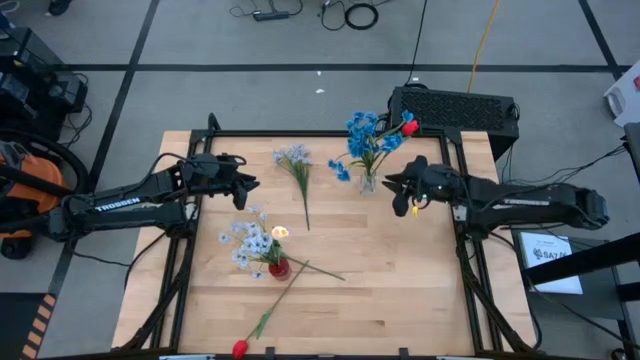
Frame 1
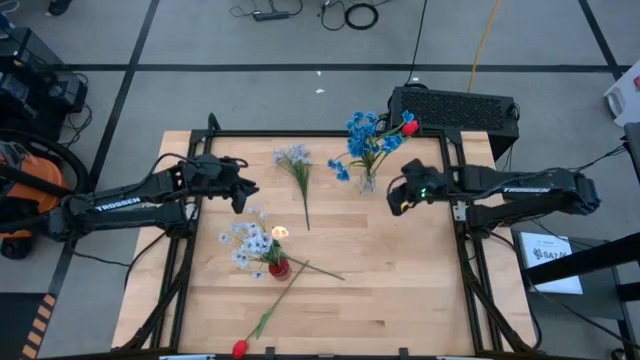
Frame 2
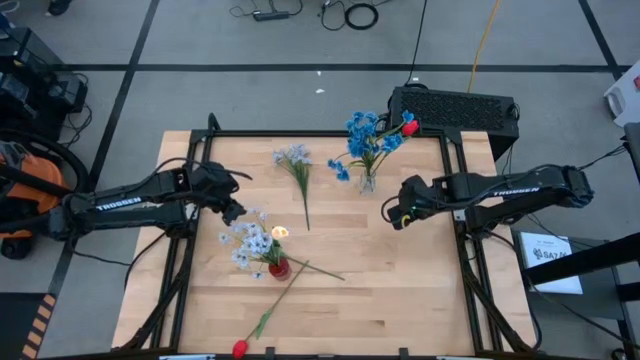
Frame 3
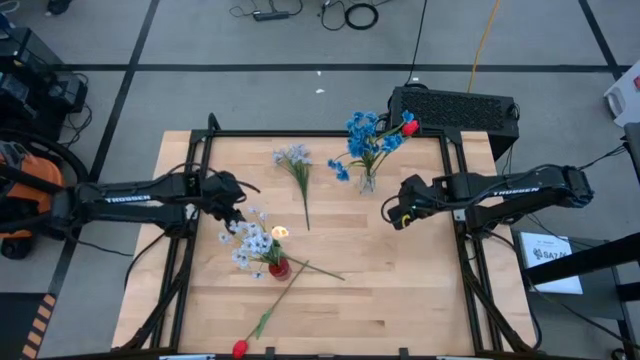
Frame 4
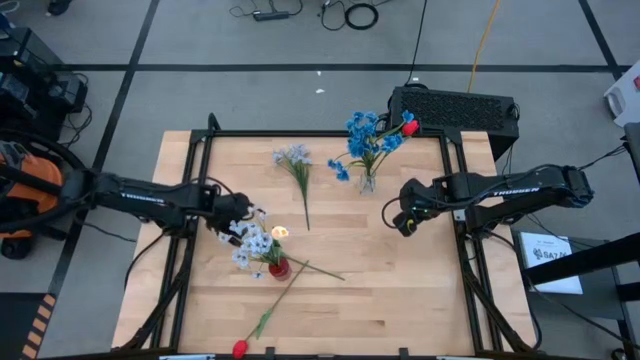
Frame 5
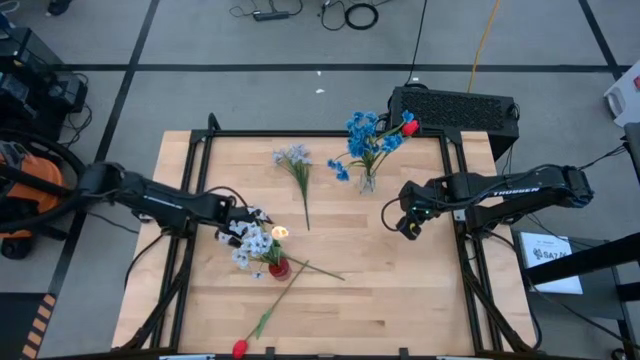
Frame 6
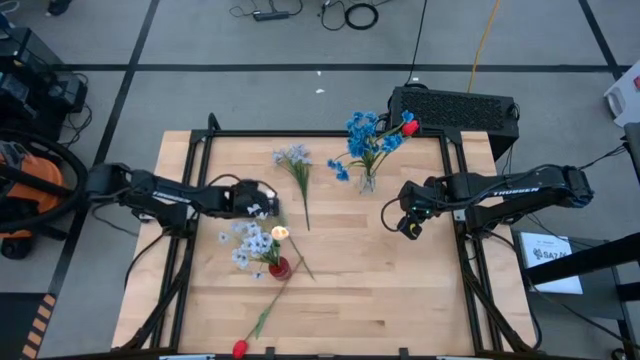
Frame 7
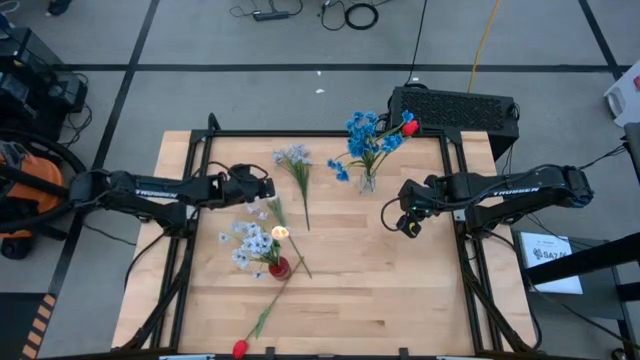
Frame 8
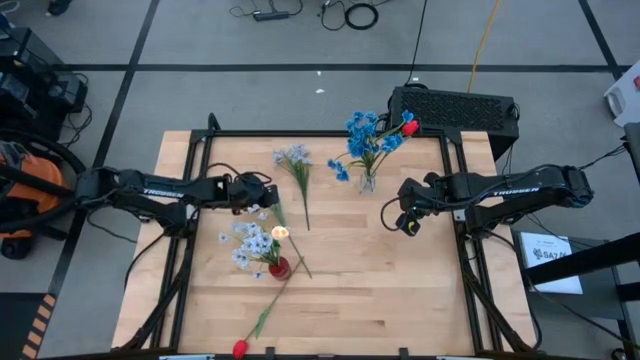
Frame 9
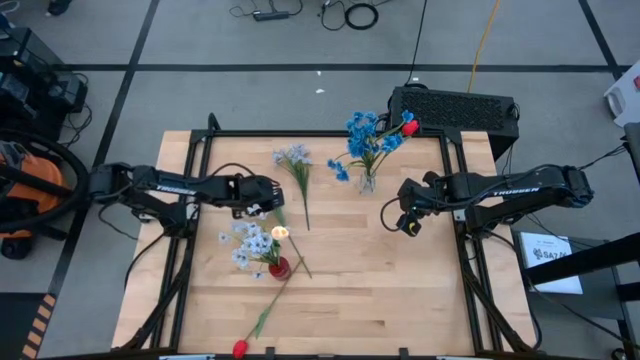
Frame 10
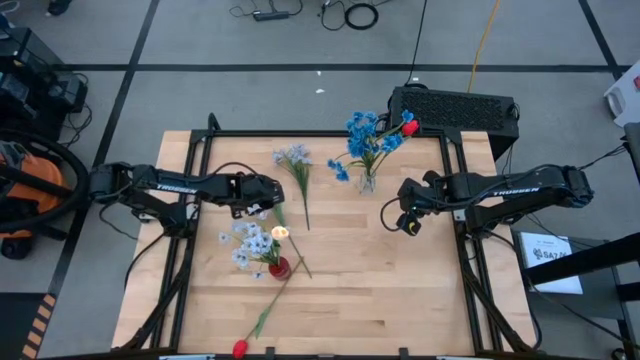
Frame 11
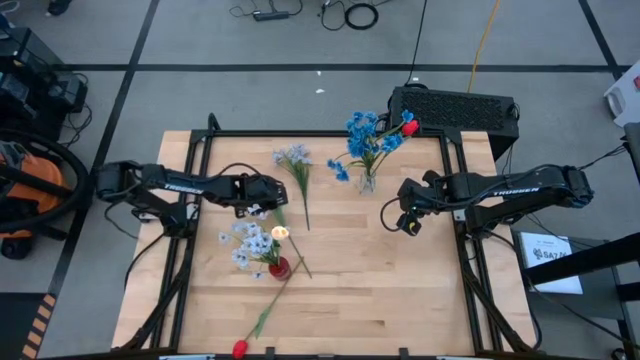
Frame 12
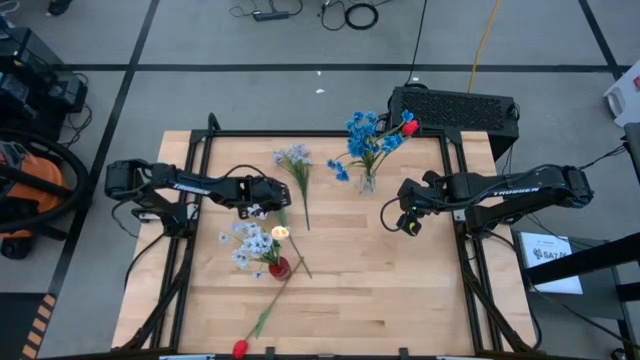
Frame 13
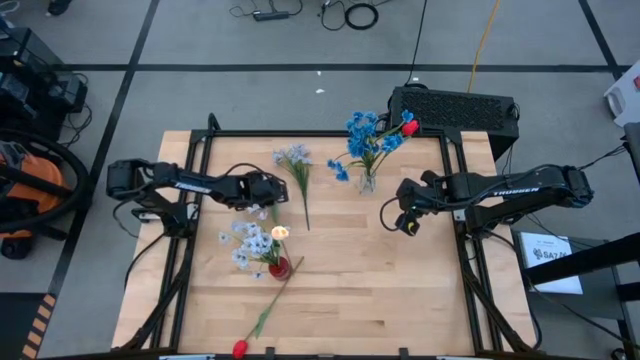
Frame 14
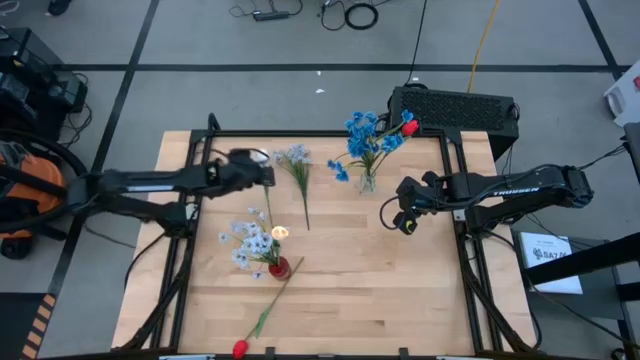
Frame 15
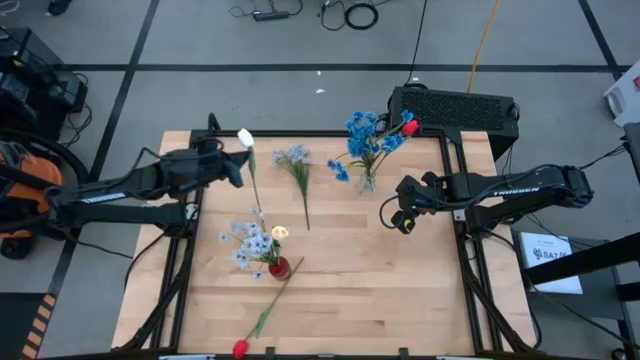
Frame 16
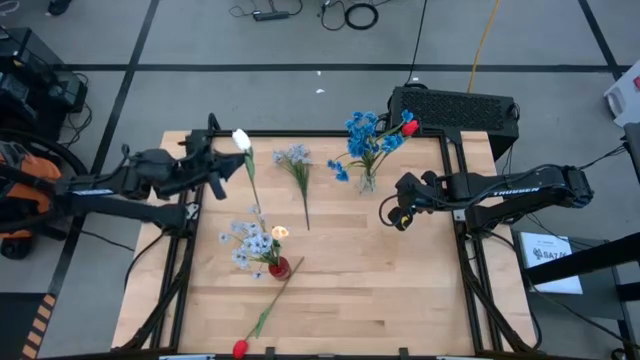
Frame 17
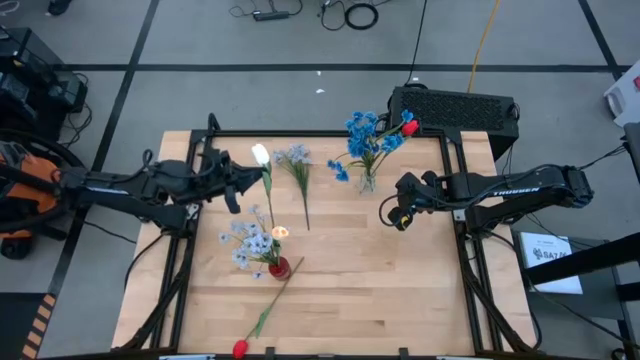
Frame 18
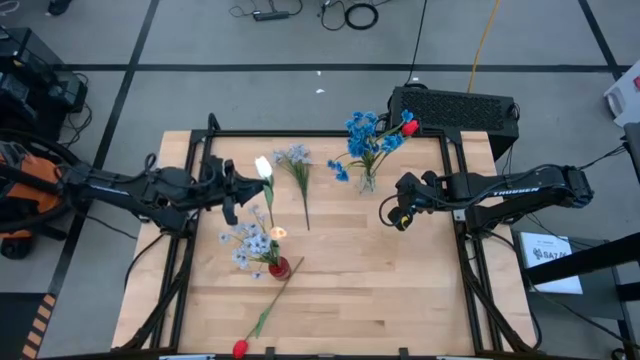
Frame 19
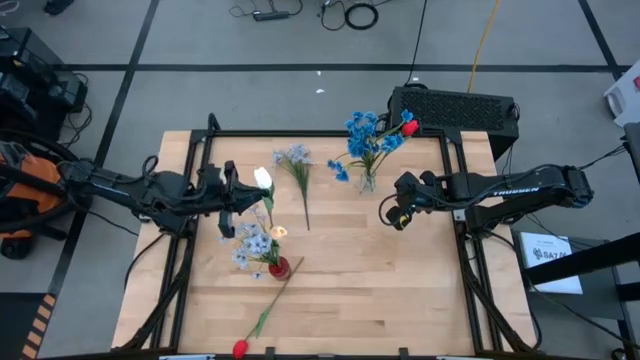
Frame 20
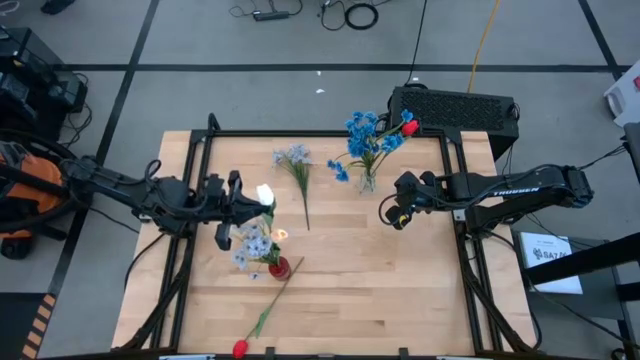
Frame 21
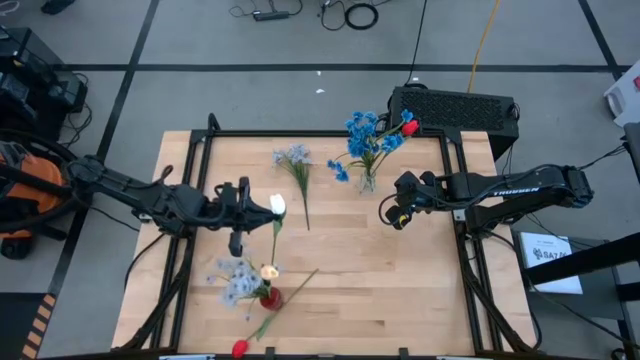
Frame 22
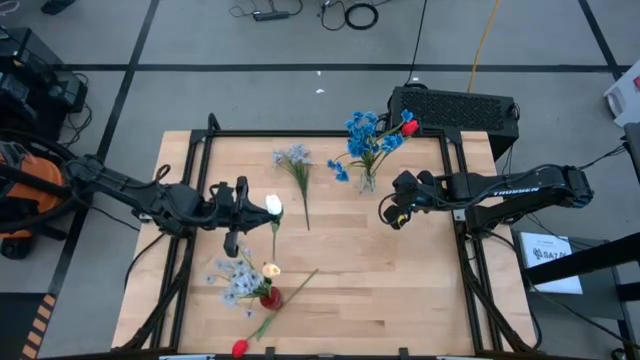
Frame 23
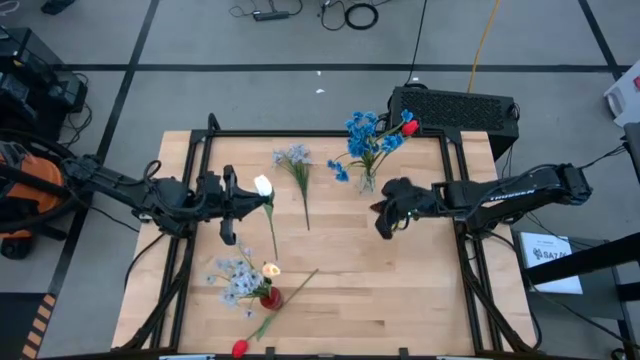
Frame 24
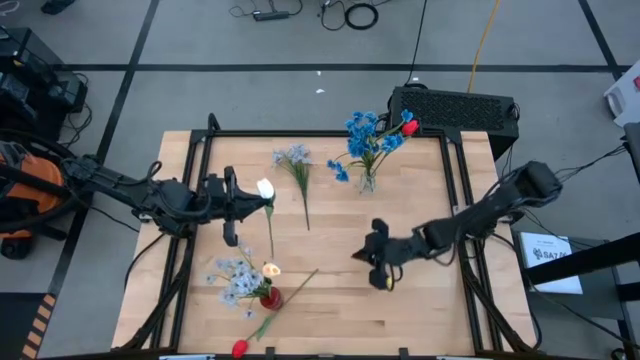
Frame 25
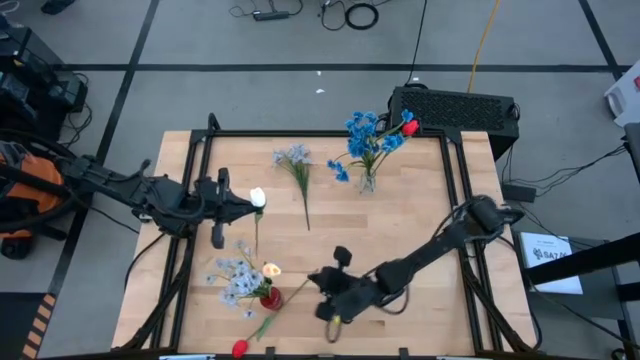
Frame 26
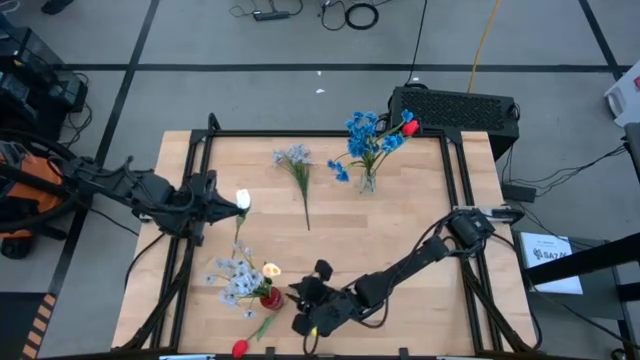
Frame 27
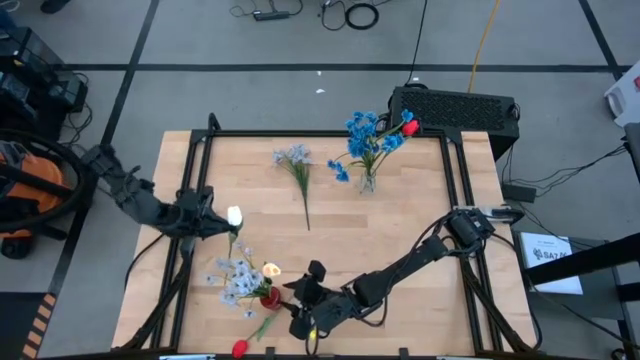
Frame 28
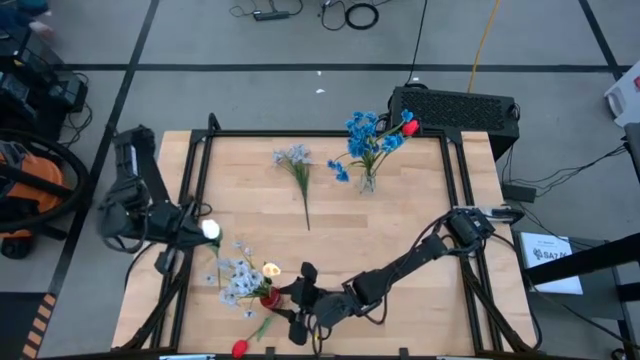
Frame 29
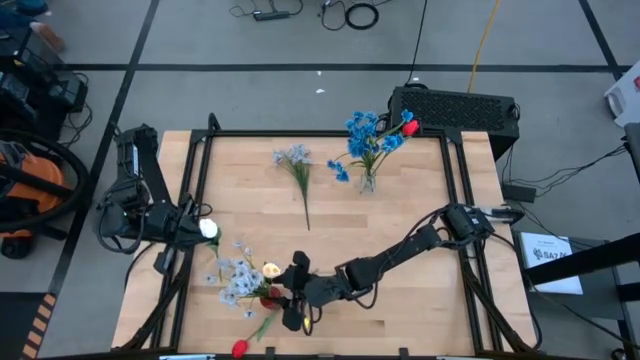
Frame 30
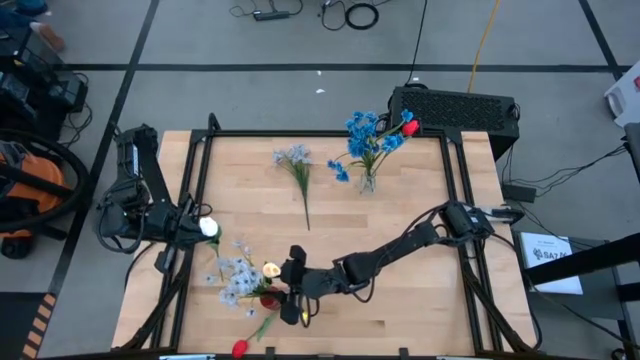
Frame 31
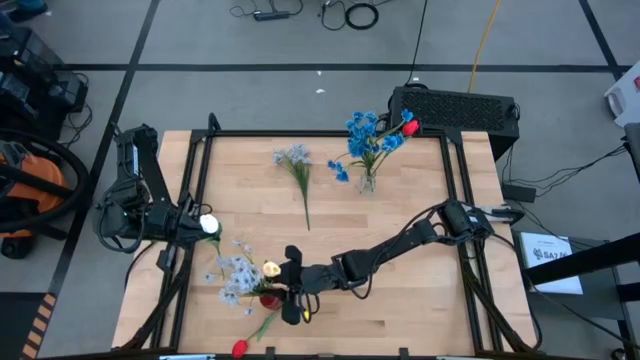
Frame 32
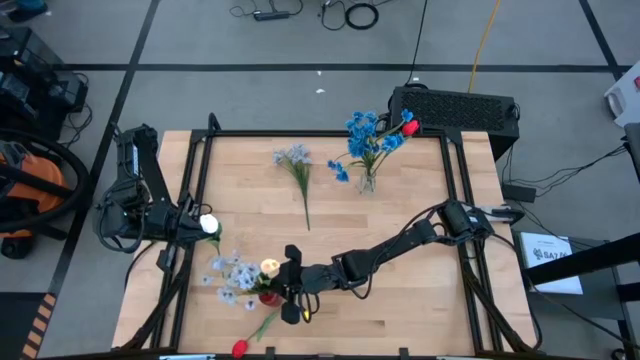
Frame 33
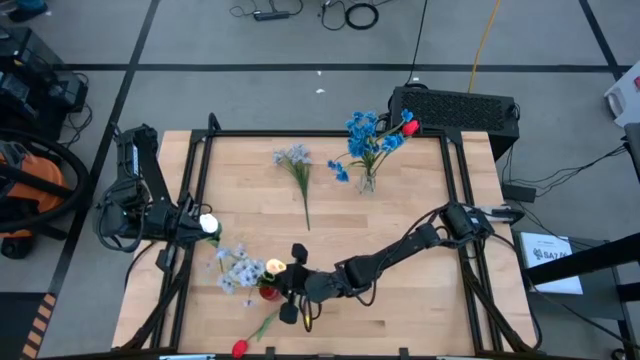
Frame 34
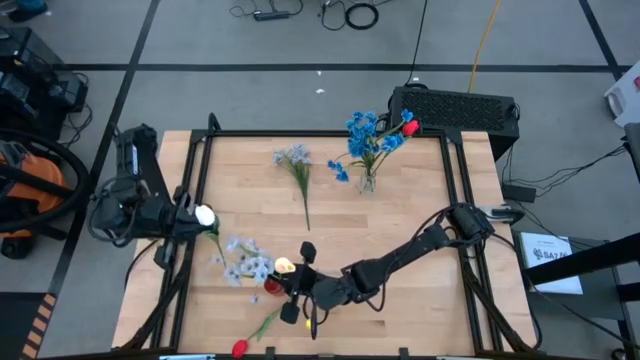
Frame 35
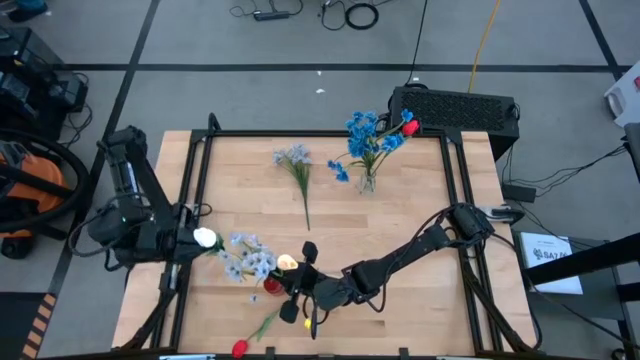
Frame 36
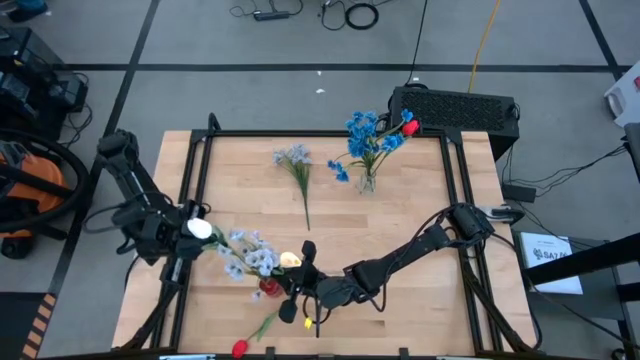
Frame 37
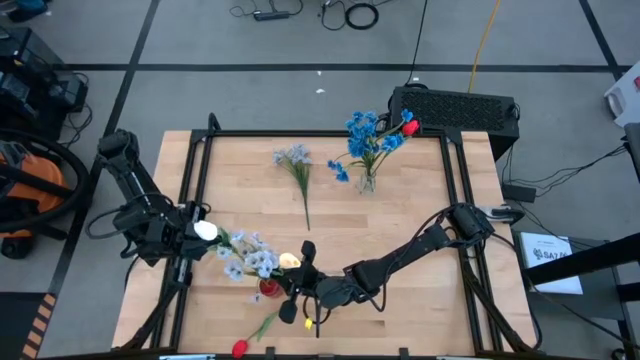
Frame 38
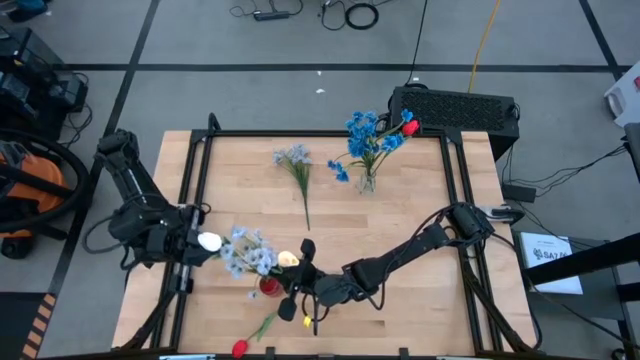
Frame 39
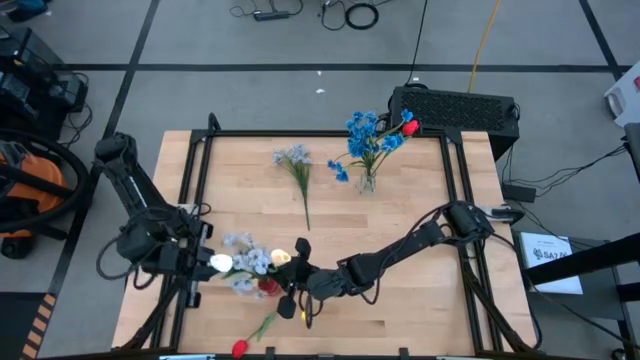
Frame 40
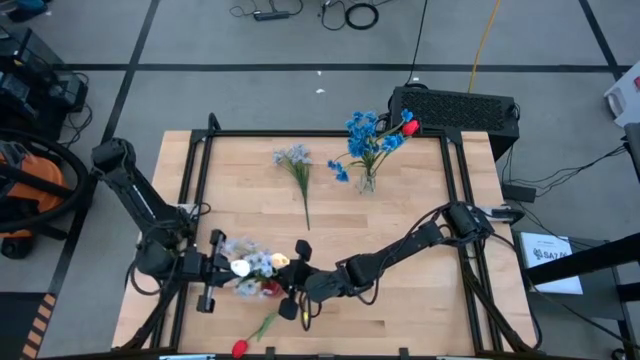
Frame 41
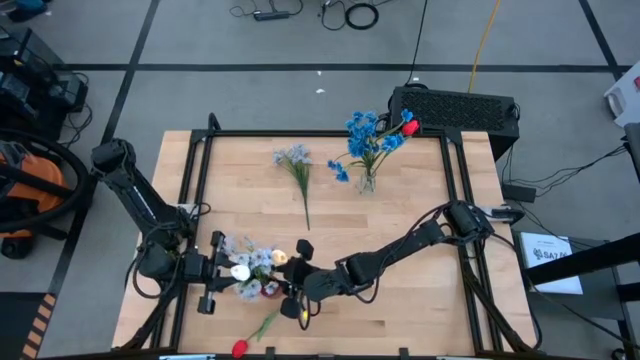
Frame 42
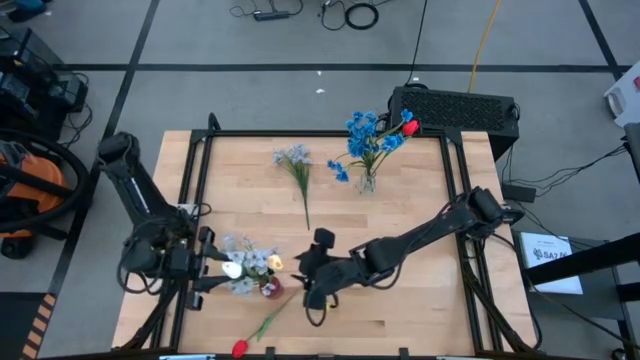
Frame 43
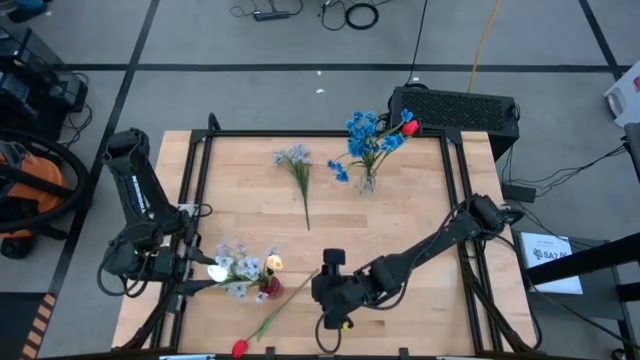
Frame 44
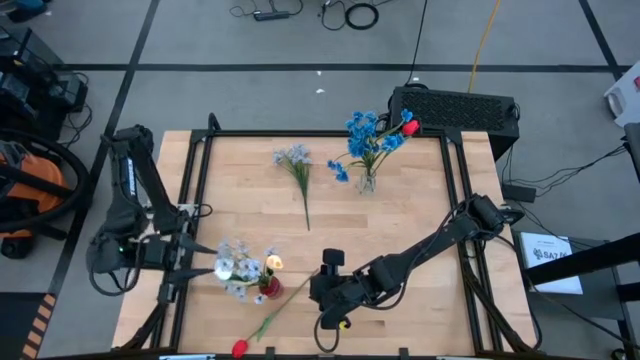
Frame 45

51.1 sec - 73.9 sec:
Task: Sort flowers into vase by color
Put the bottom white flower into the red vase
